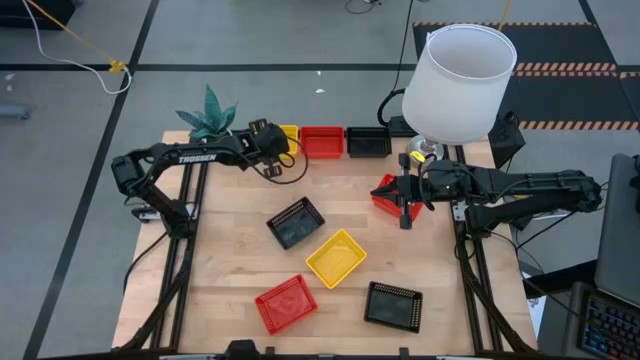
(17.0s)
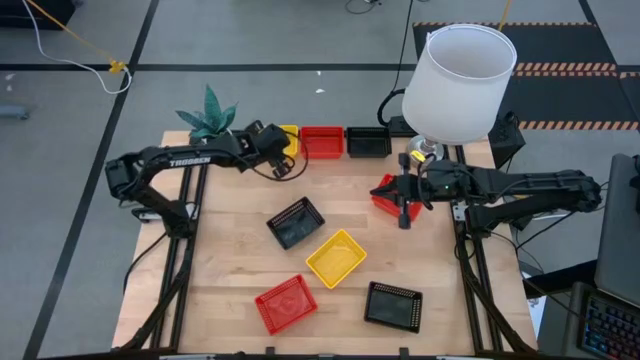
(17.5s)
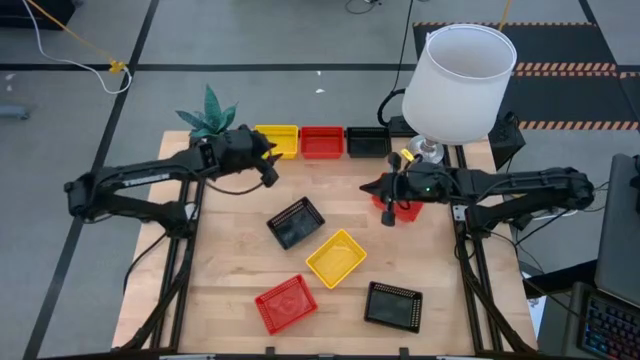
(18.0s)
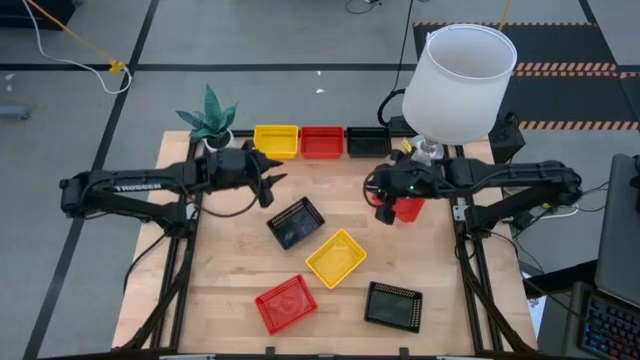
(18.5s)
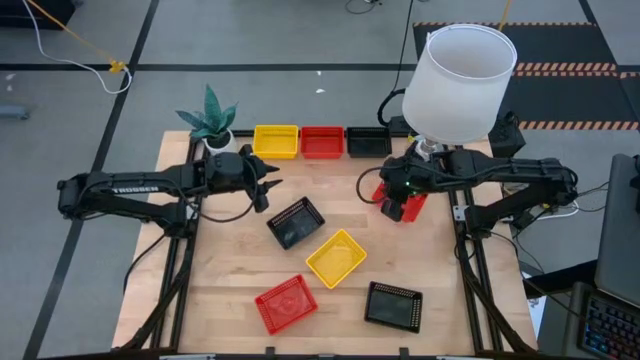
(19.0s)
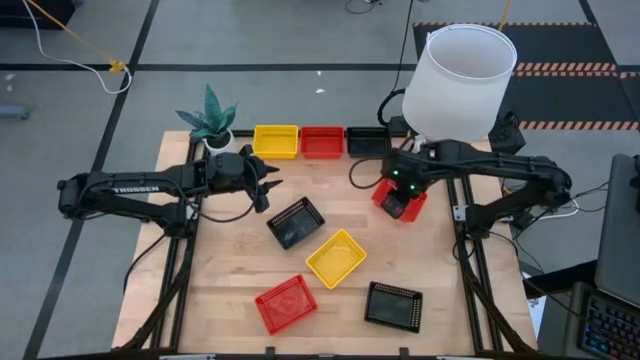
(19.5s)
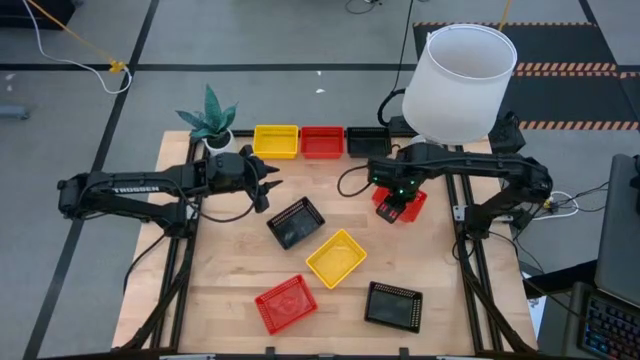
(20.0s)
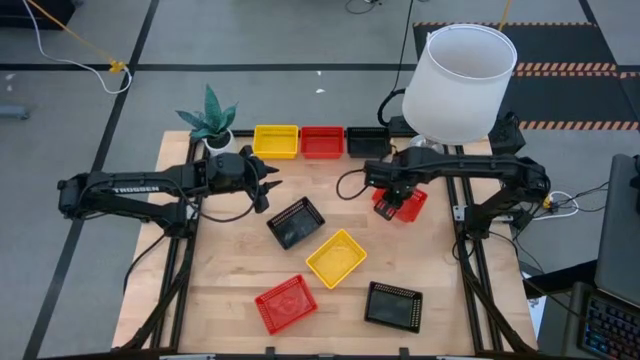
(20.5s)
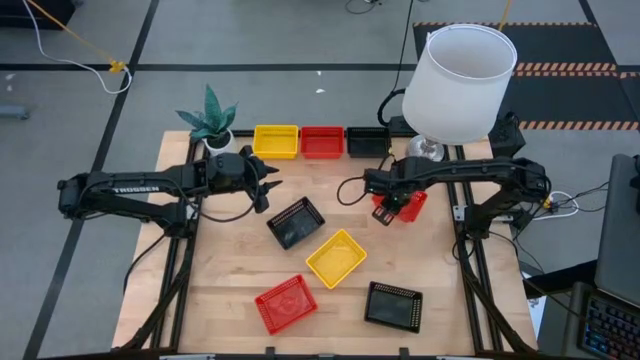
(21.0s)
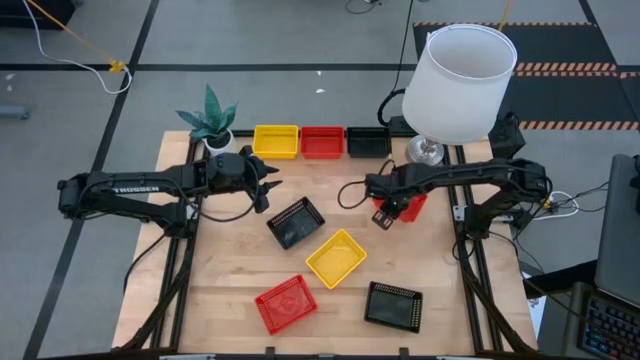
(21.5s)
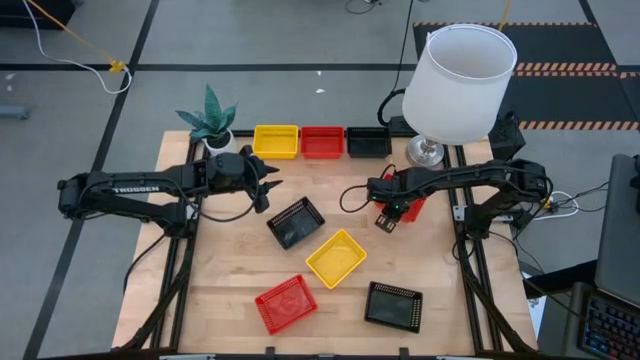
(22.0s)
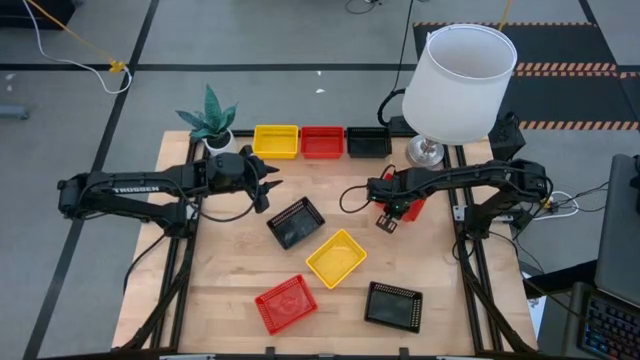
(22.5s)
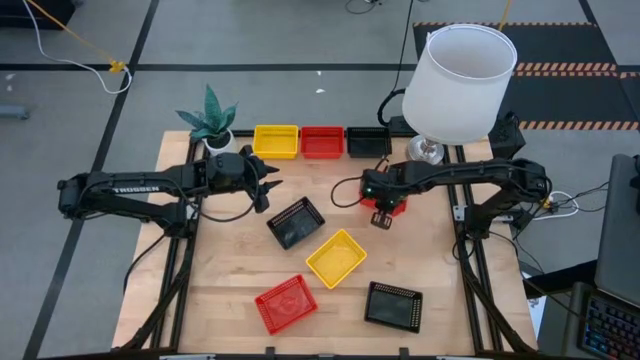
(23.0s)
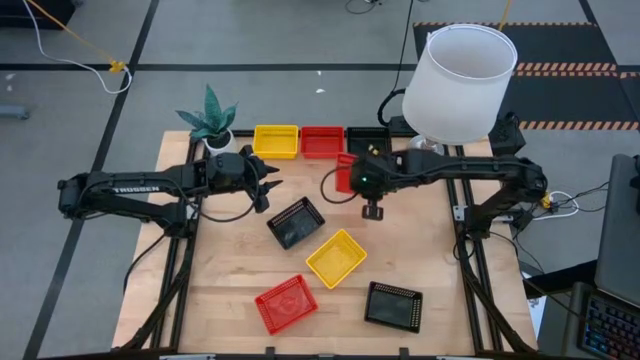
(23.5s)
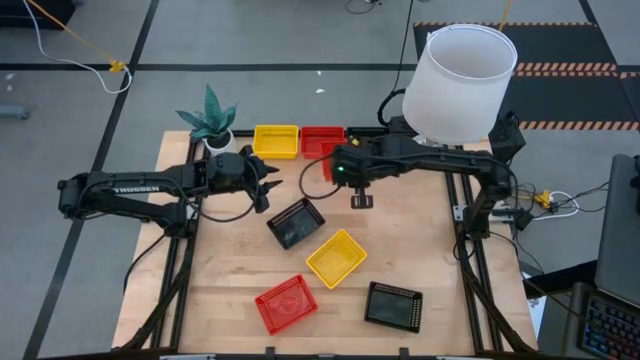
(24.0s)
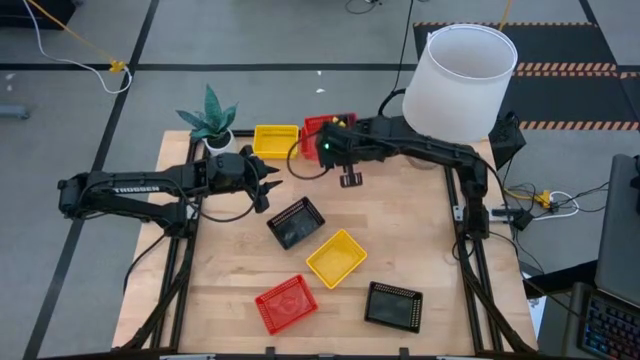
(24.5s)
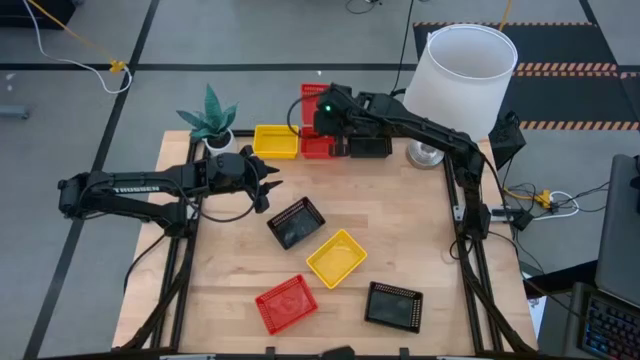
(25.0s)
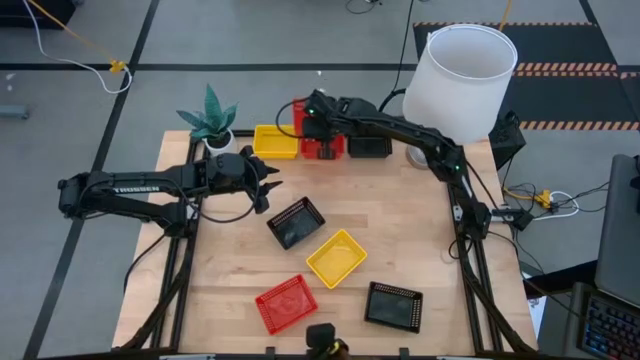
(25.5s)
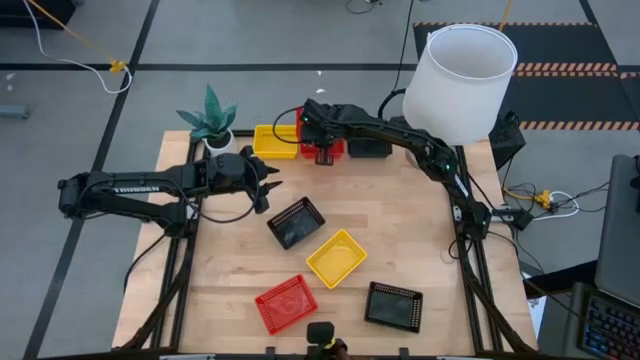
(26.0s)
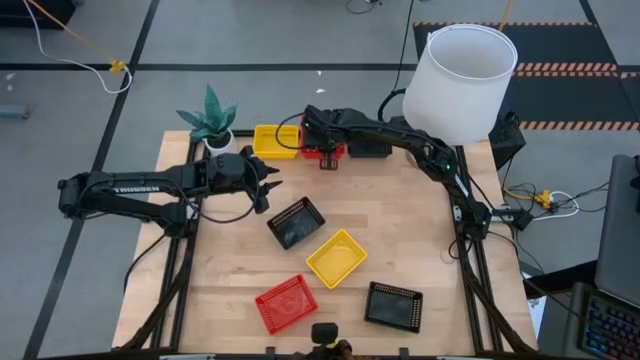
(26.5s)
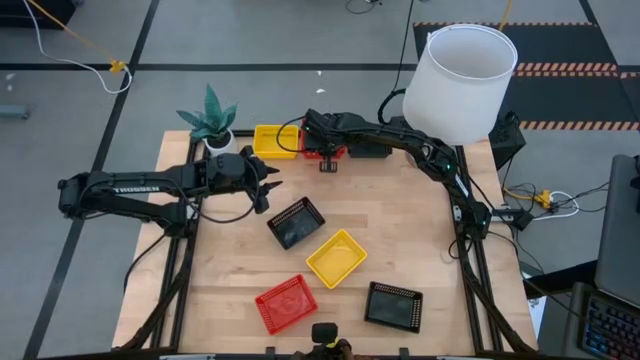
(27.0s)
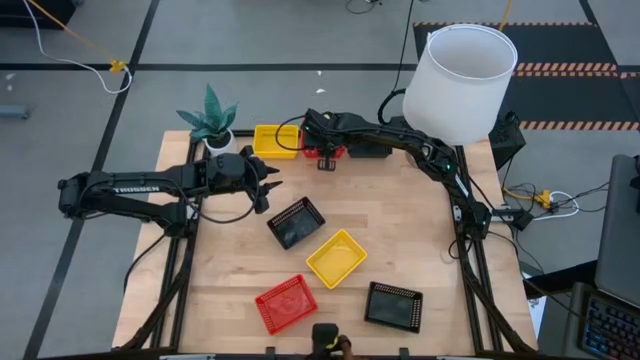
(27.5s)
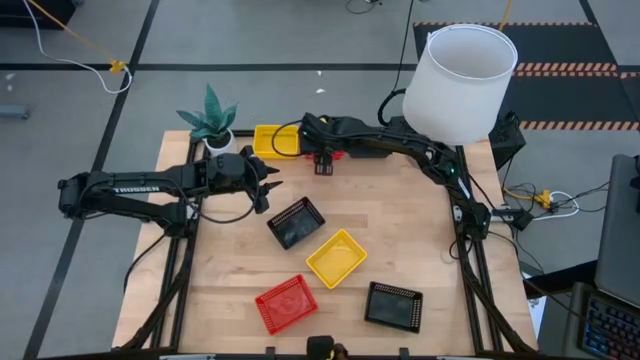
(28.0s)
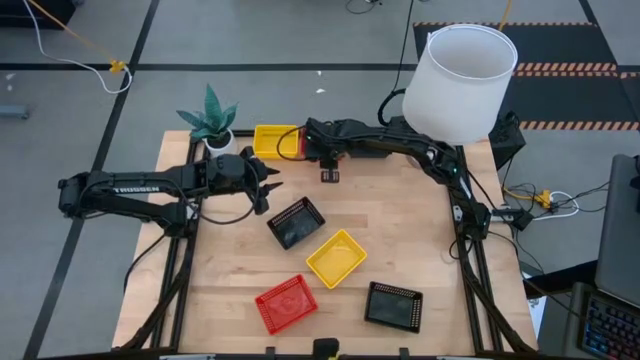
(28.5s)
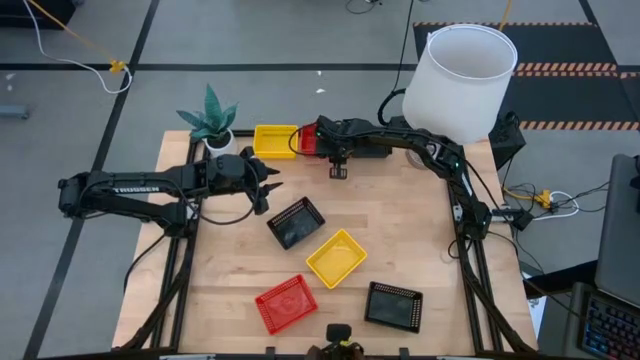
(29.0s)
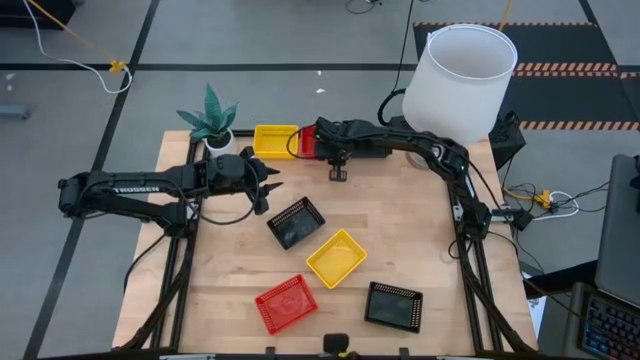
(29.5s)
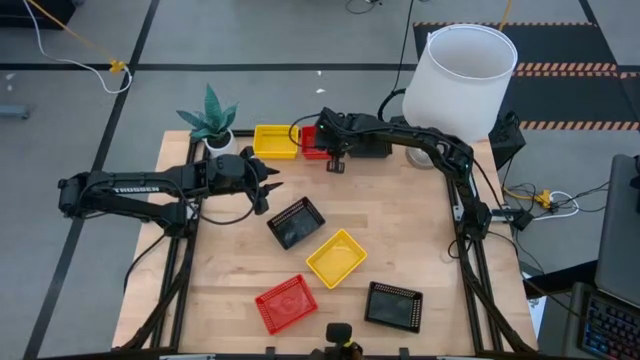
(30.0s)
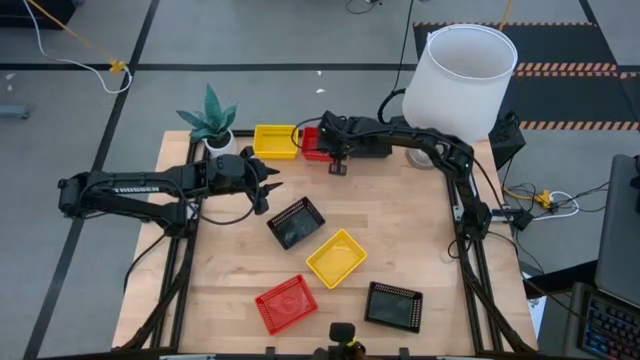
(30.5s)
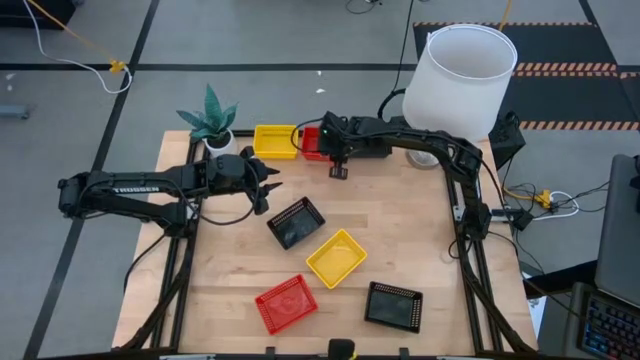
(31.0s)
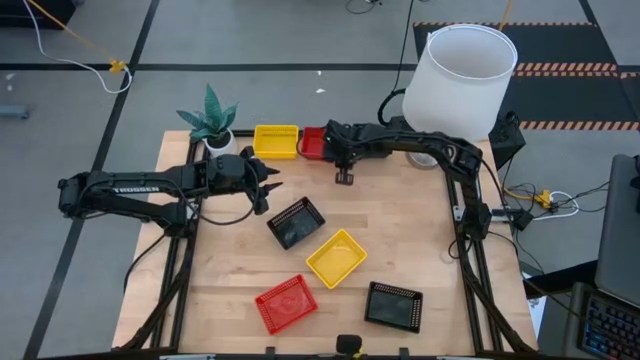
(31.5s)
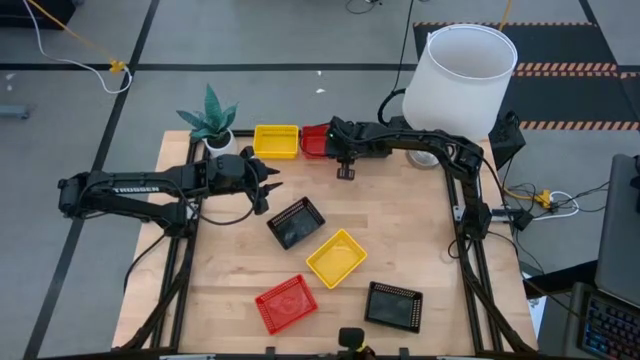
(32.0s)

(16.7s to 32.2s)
Stack the middle red bin on the top red bin
